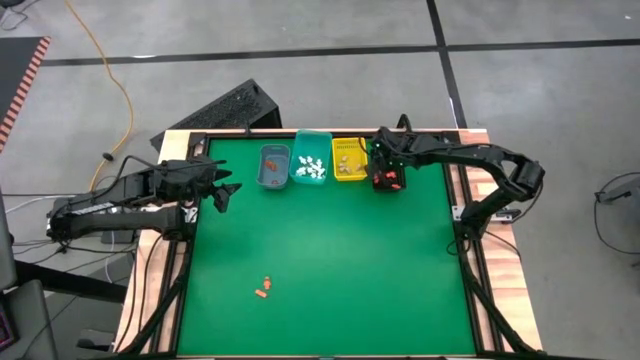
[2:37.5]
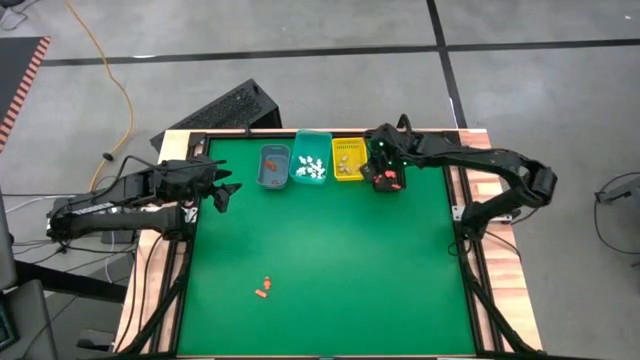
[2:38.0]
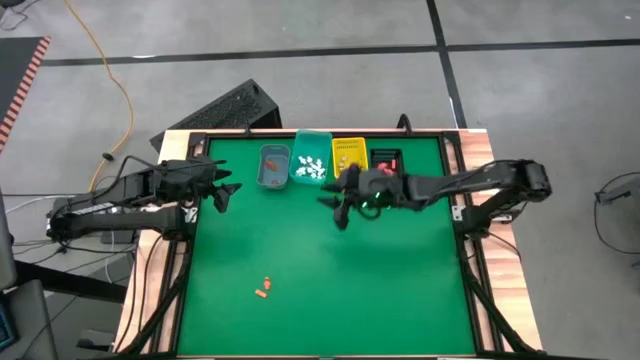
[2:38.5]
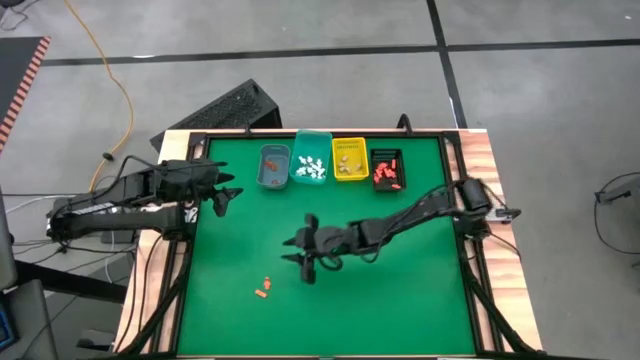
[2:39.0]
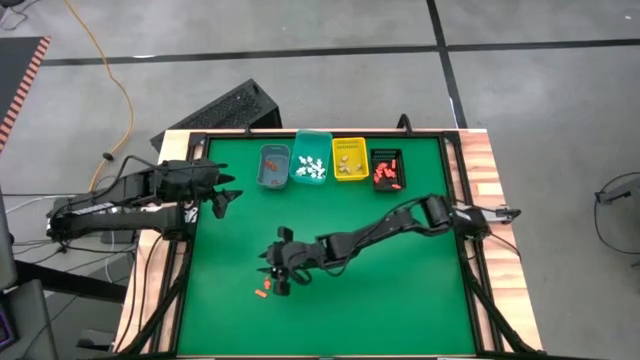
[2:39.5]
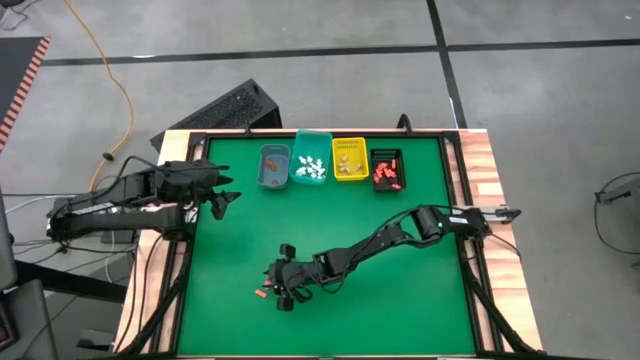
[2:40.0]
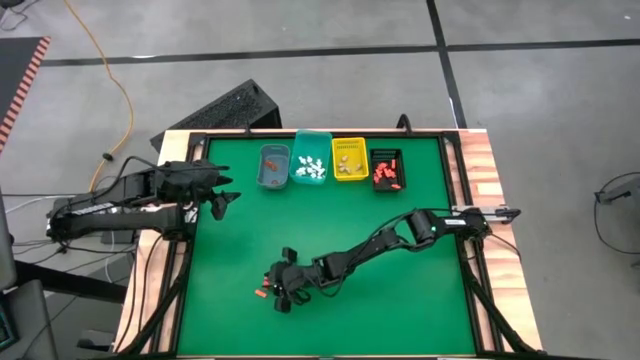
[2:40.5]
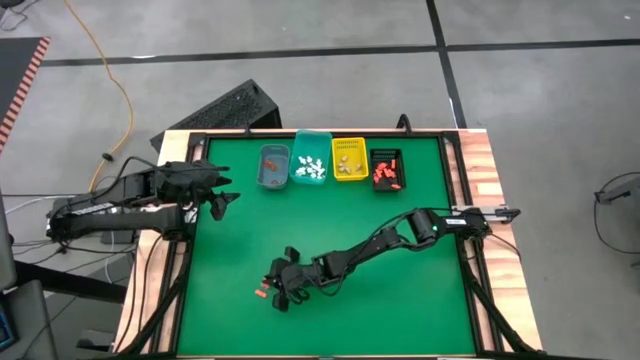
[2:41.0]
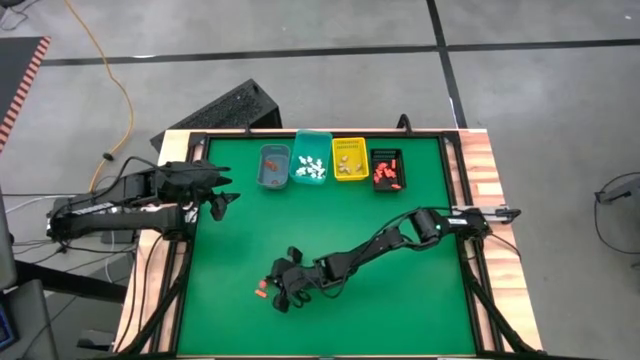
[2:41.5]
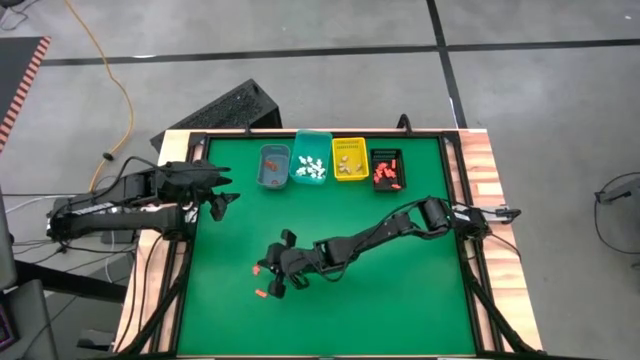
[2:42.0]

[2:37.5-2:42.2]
Task: Sort Halloween decoration
Put the orange skeleton toy into the black bin

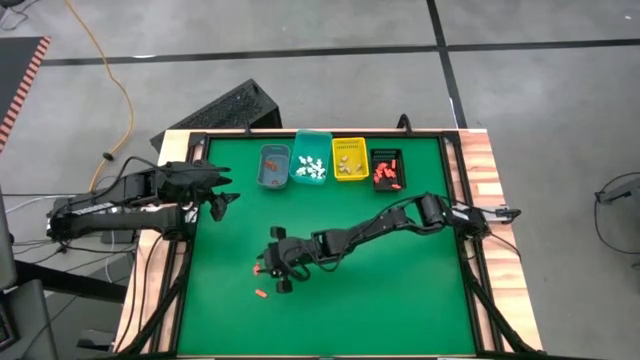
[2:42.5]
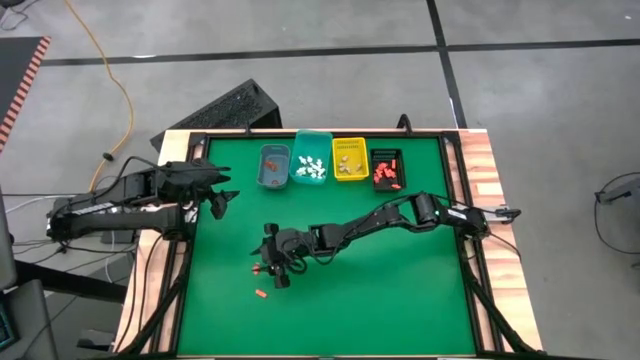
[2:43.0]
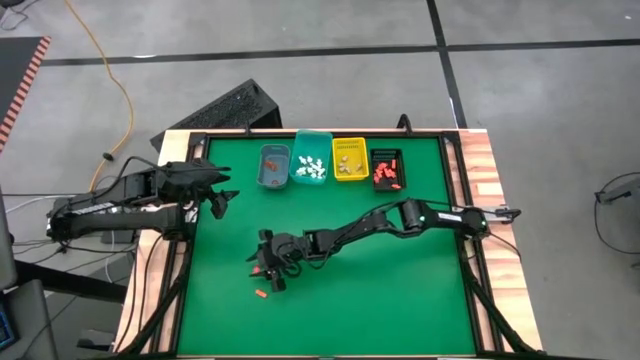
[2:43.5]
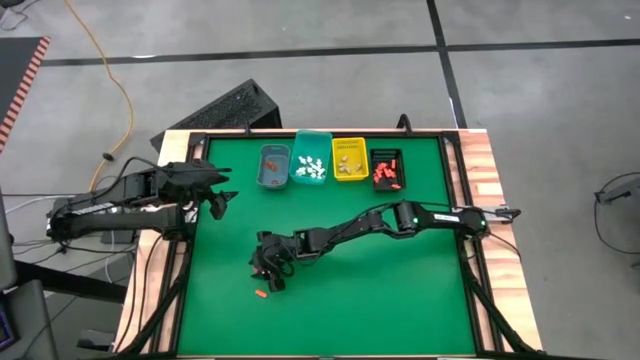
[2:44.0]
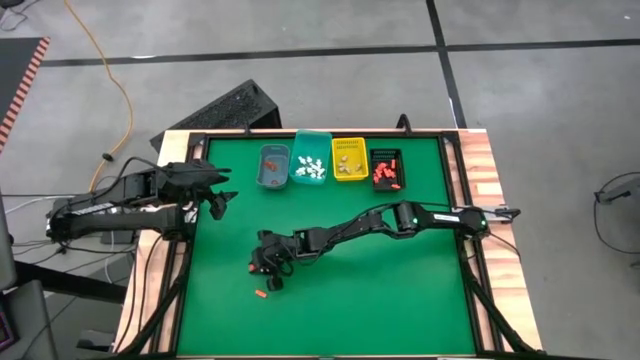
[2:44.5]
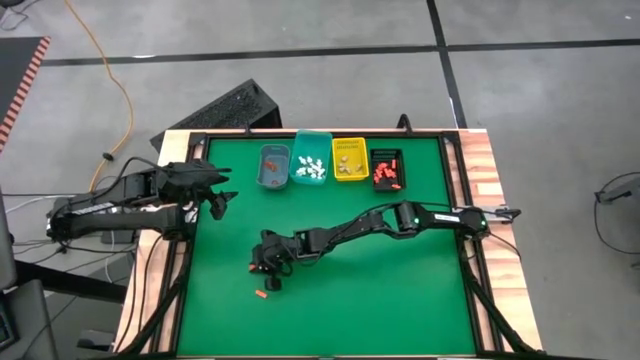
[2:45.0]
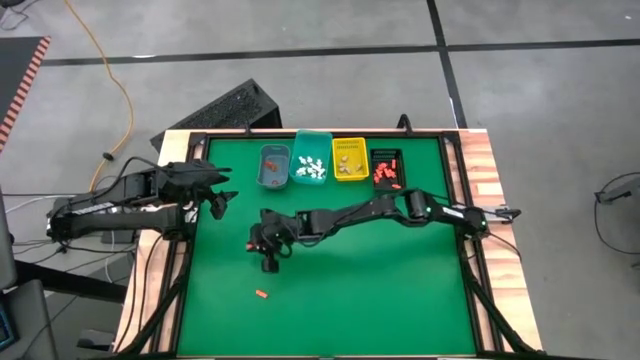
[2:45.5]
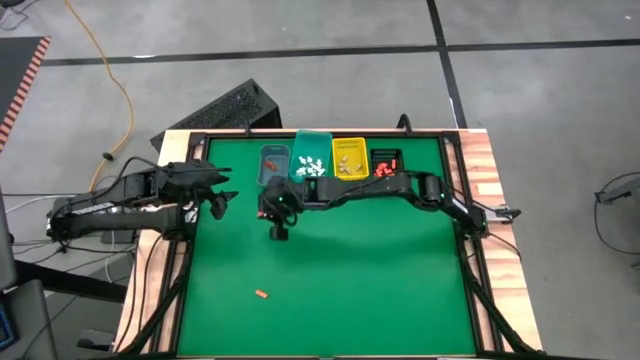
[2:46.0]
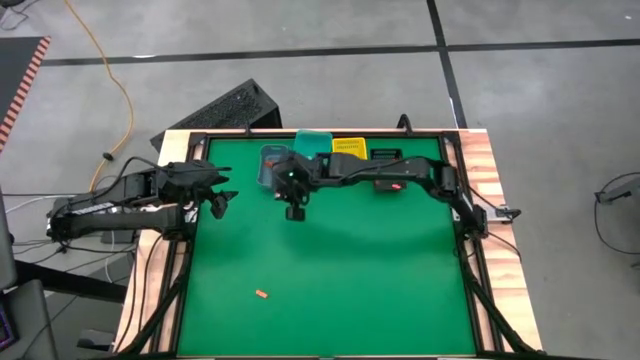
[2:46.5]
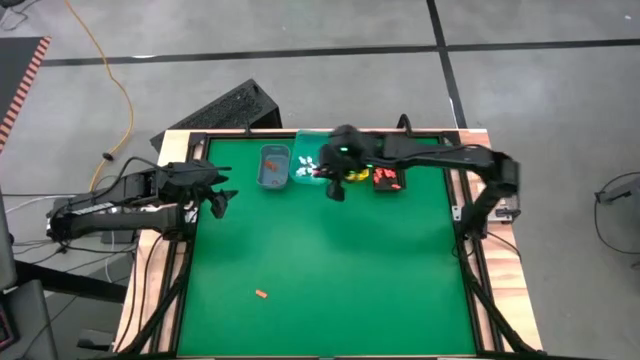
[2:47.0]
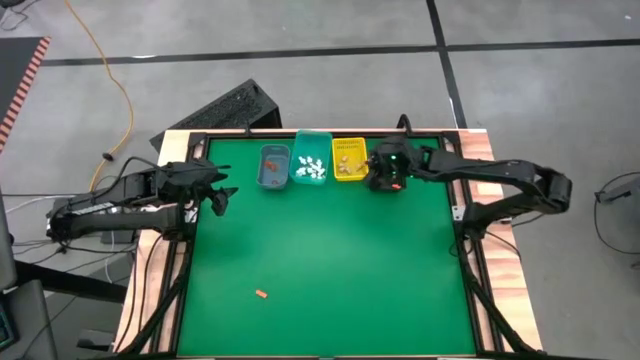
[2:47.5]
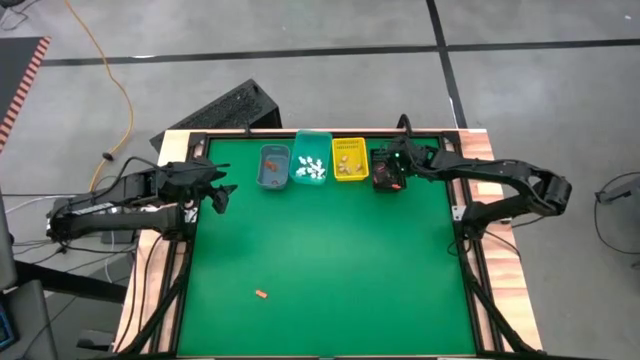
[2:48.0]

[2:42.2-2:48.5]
Put the orange skeleton toy into the black bin

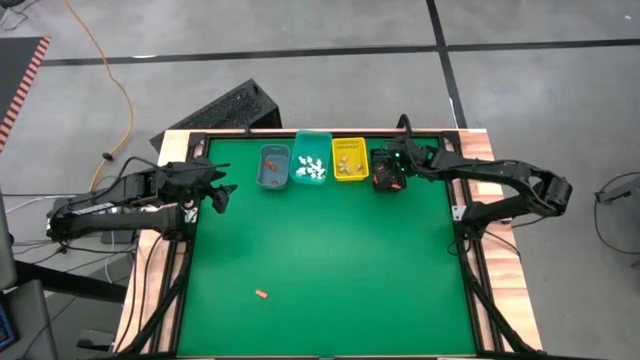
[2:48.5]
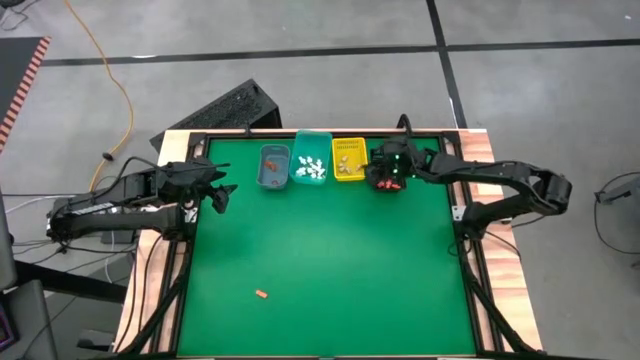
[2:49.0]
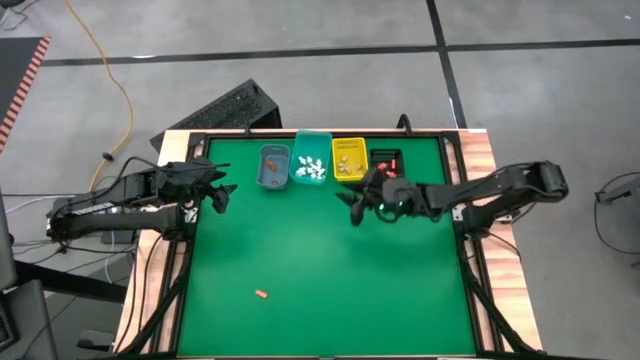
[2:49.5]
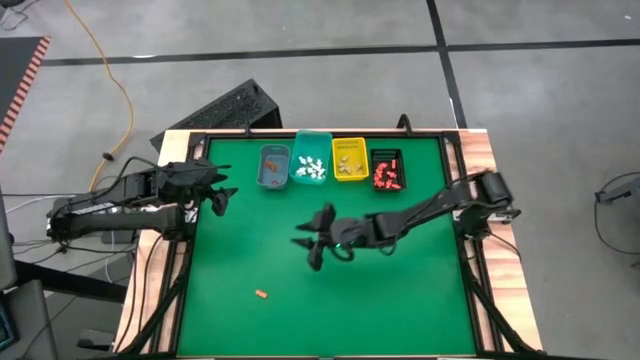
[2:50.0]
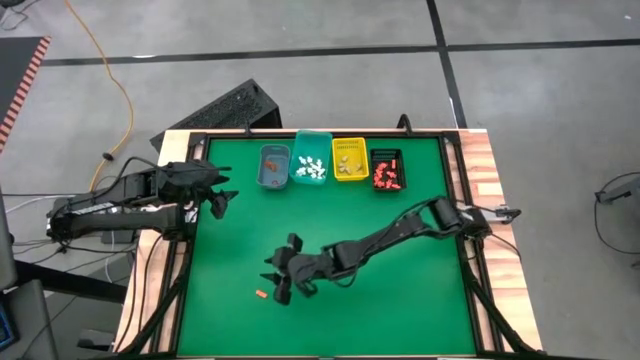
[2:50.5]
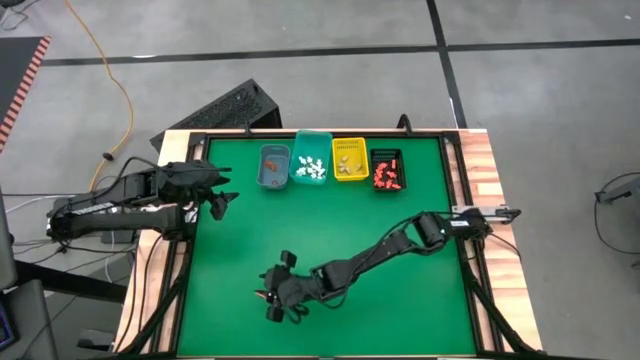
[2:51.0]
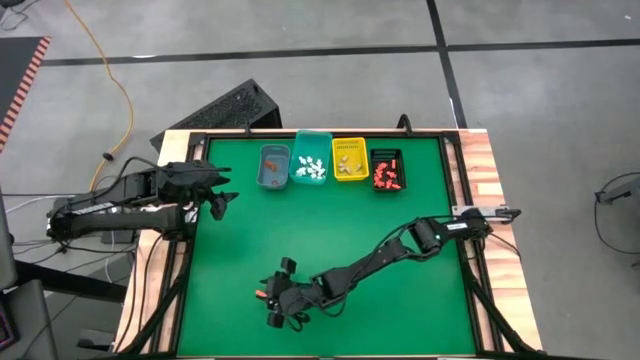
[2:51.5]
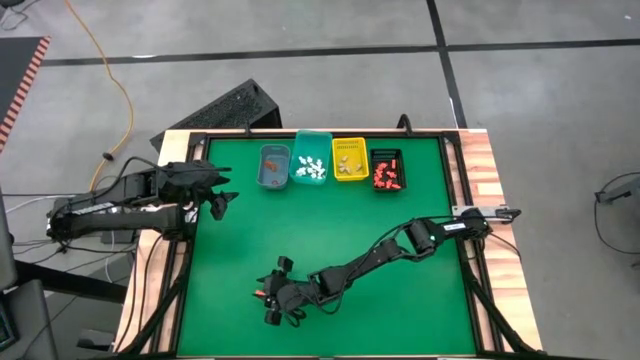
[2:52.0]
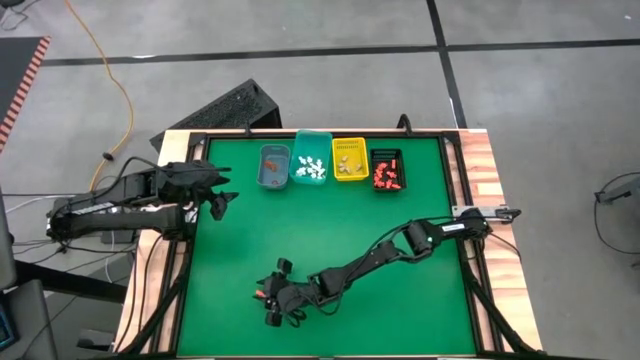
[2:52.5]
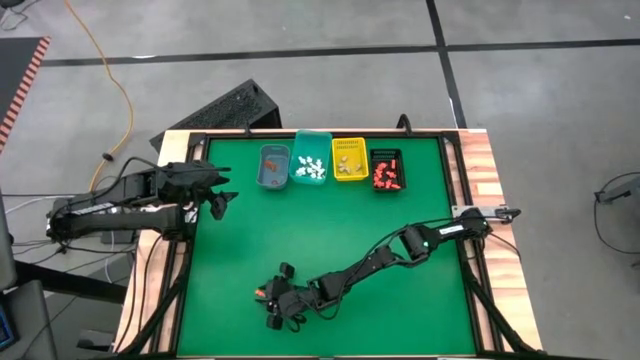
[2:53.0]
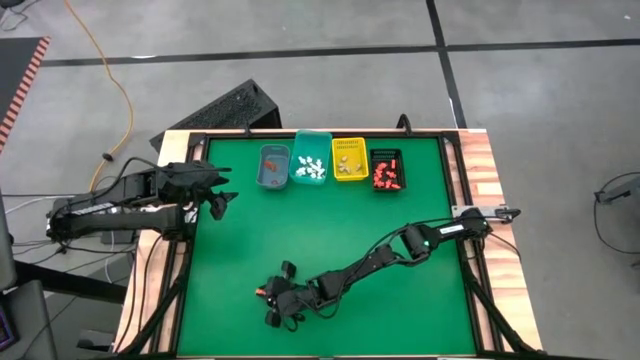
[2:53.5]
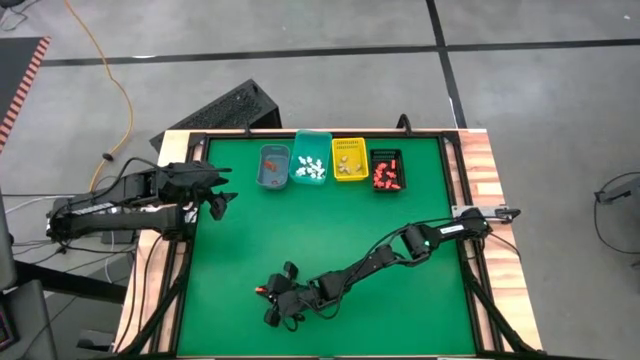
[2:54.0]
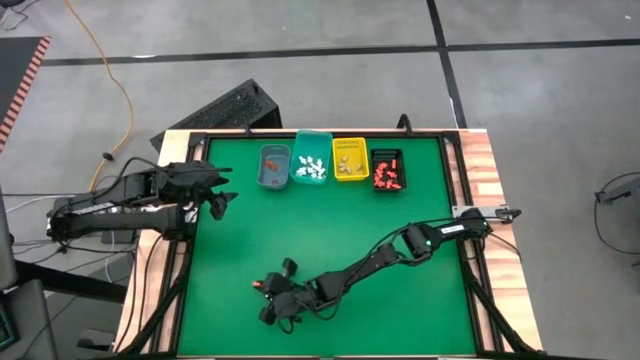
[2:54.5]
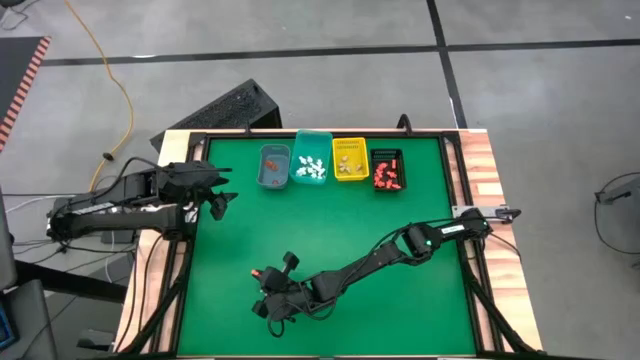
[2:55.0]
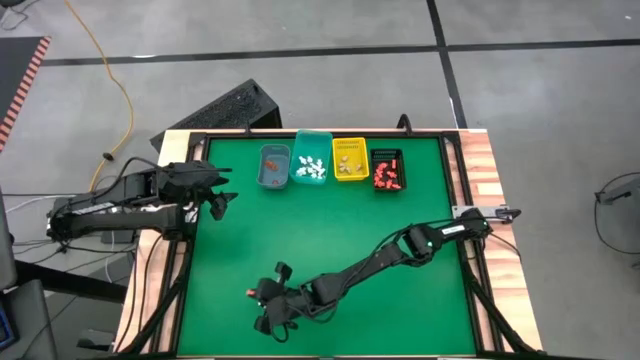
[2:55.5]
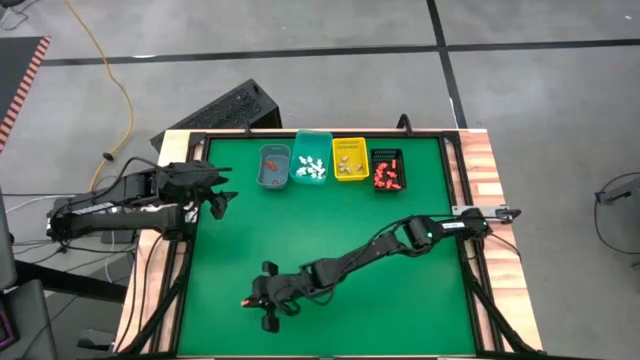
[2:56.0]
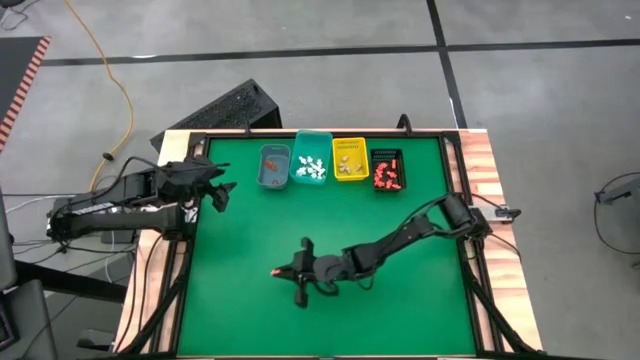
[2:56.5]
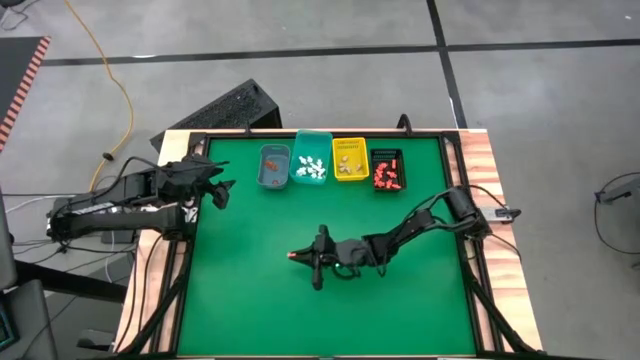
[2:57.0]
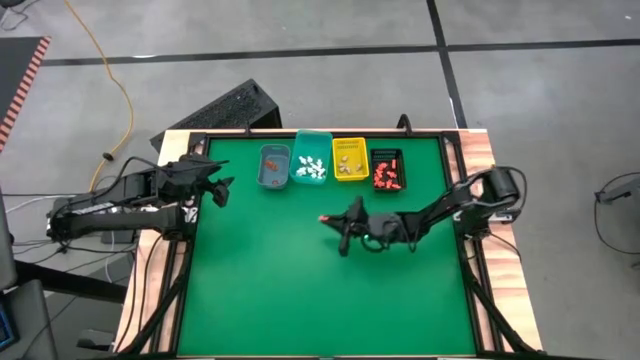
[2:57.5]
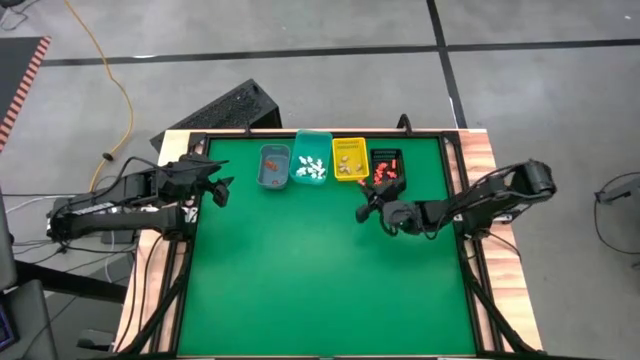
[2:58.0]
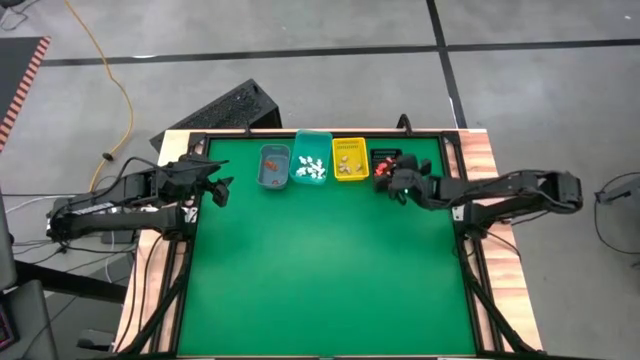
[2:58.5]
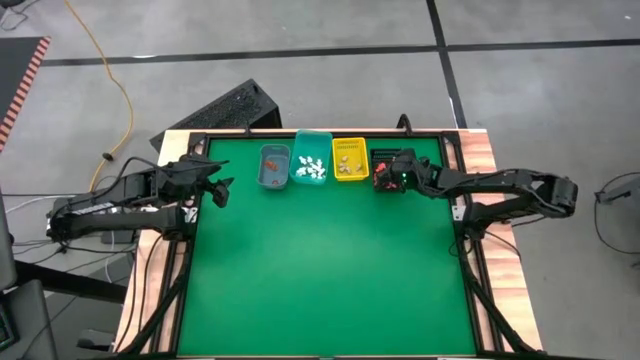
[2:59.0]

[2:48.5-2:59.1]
Put the orange skeleton toy into the black bin
